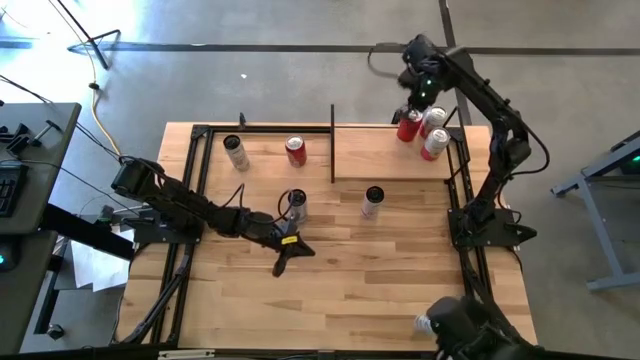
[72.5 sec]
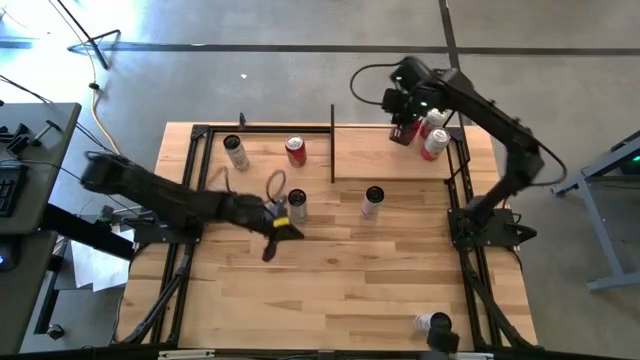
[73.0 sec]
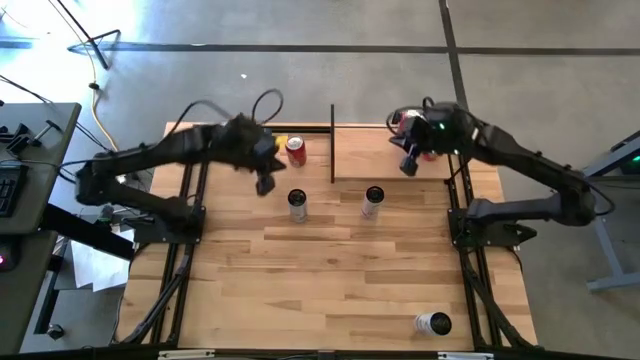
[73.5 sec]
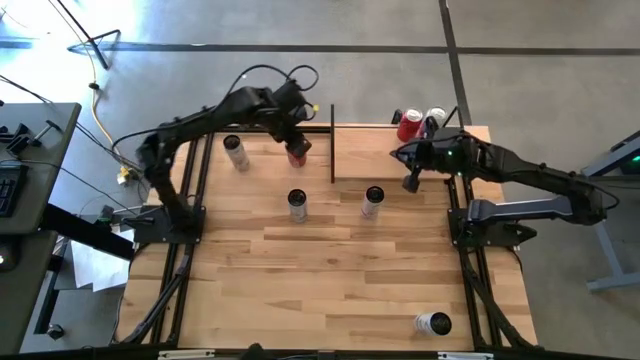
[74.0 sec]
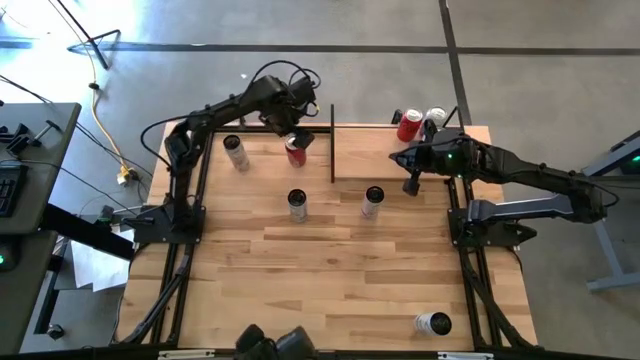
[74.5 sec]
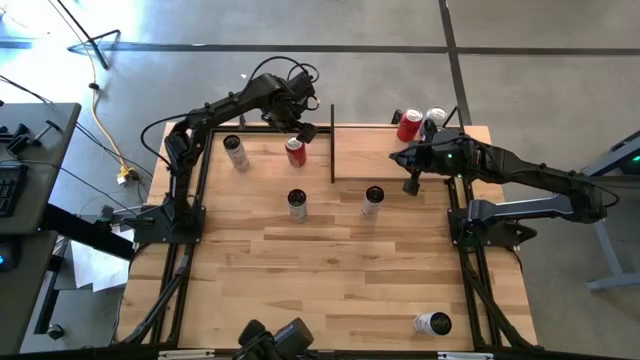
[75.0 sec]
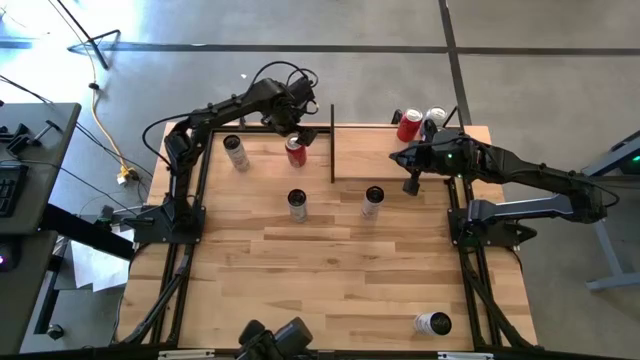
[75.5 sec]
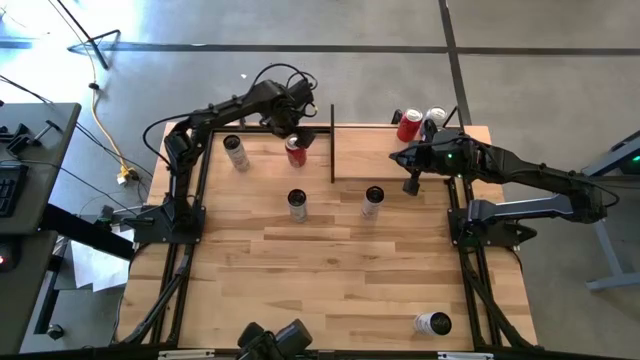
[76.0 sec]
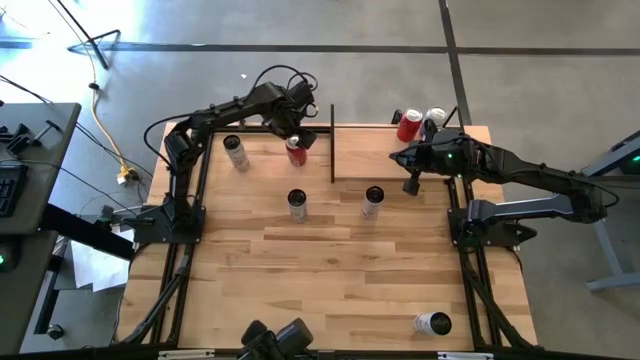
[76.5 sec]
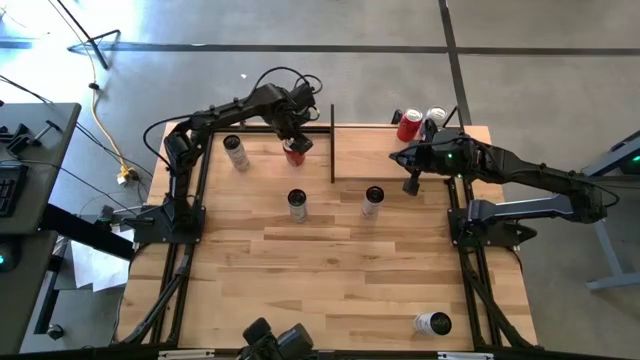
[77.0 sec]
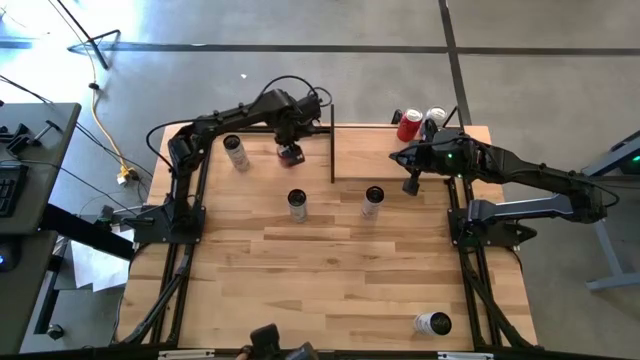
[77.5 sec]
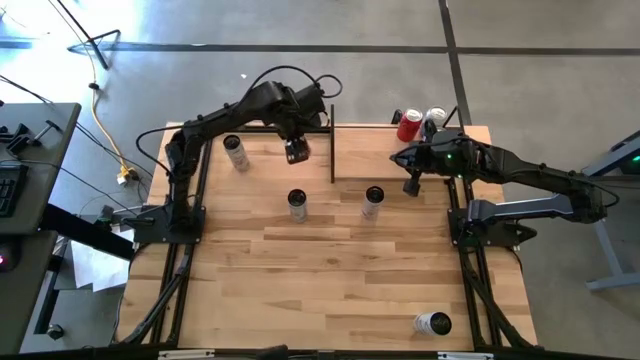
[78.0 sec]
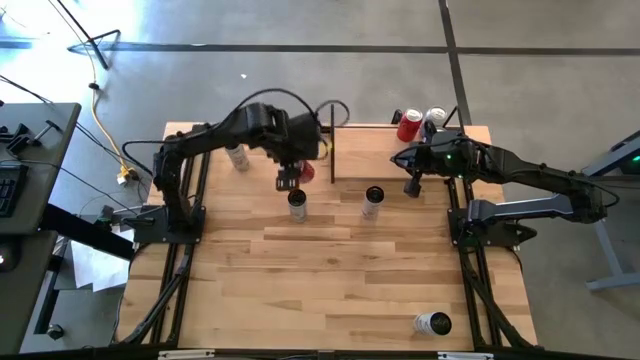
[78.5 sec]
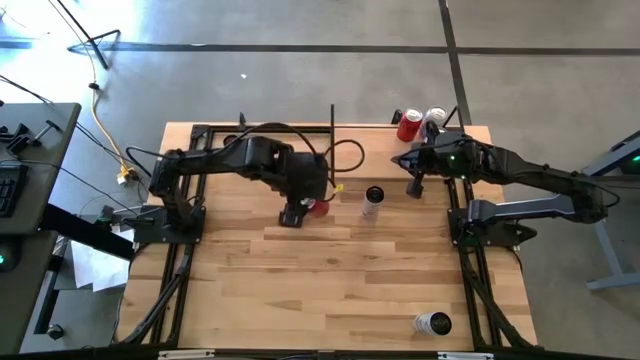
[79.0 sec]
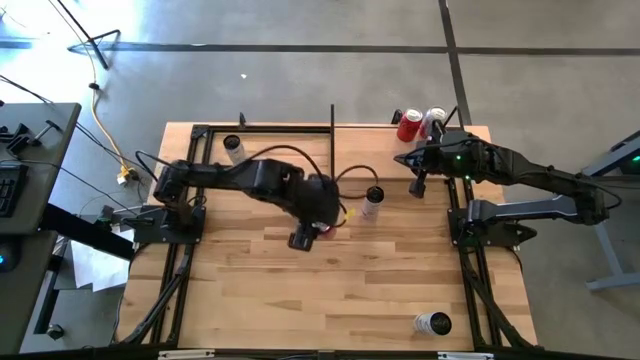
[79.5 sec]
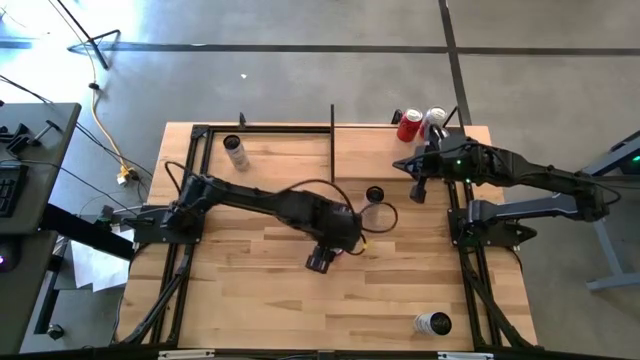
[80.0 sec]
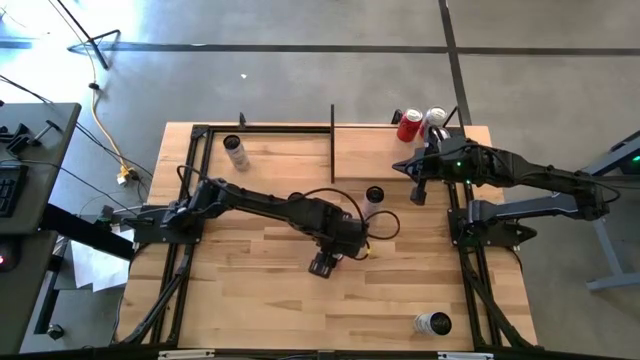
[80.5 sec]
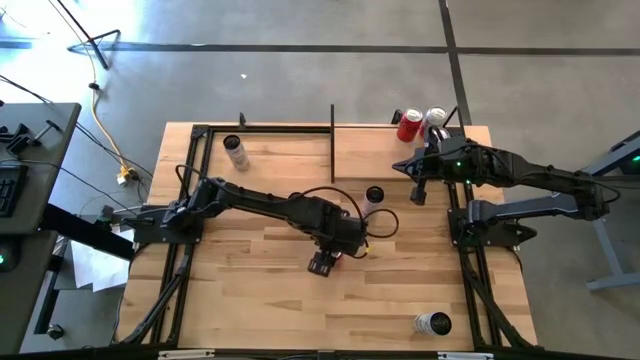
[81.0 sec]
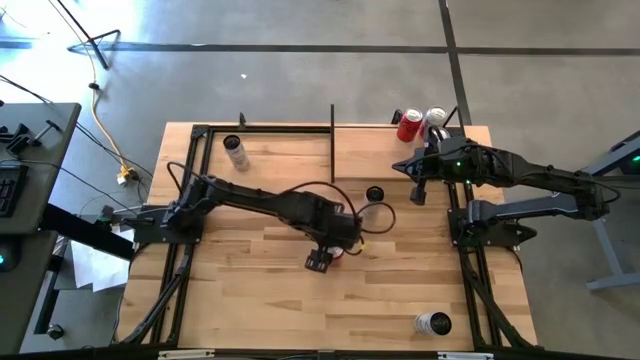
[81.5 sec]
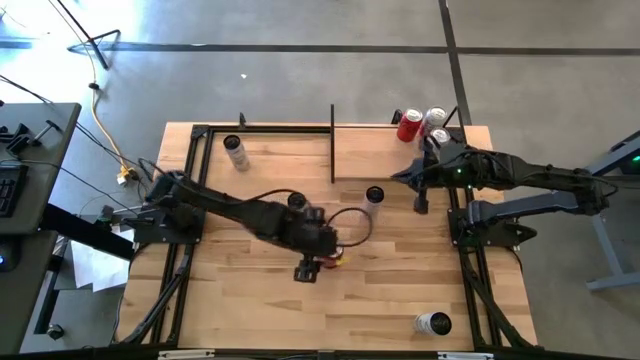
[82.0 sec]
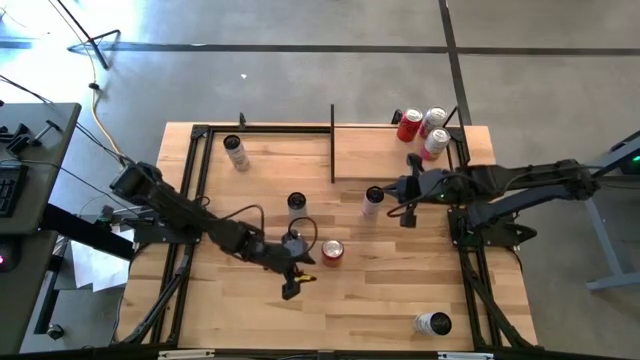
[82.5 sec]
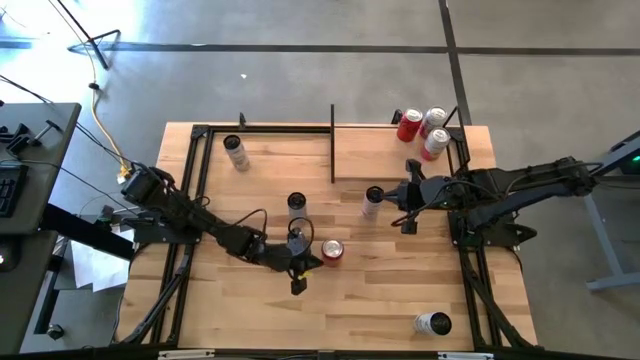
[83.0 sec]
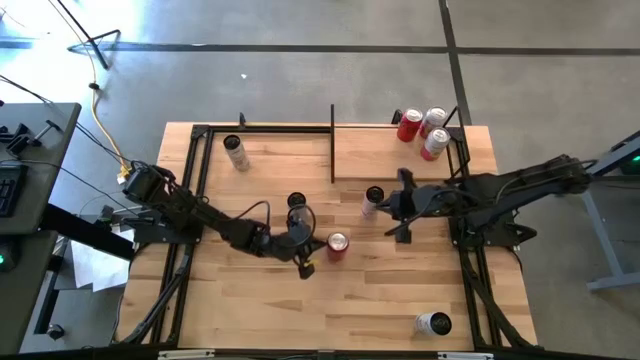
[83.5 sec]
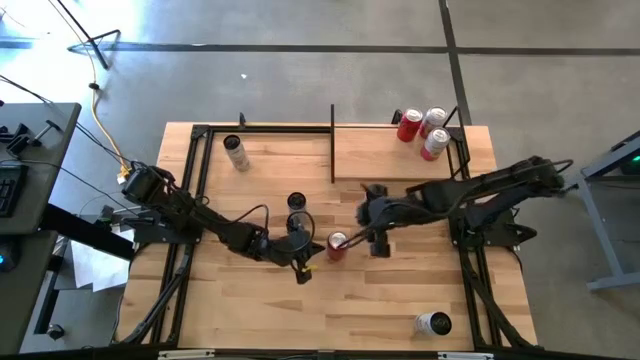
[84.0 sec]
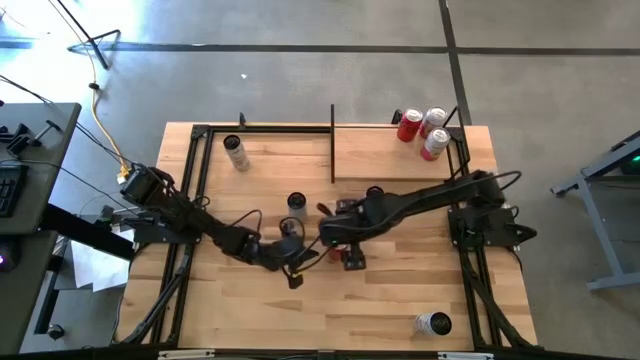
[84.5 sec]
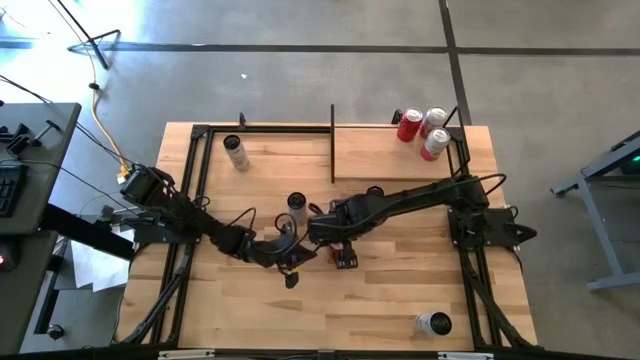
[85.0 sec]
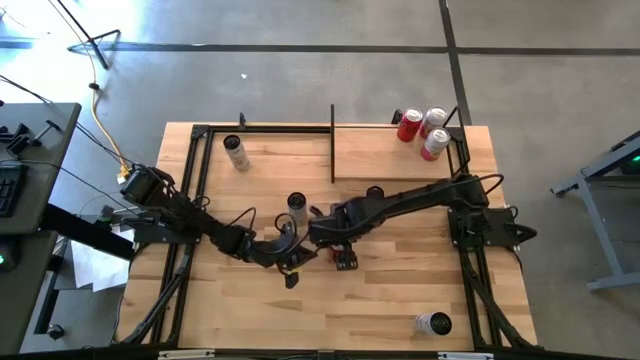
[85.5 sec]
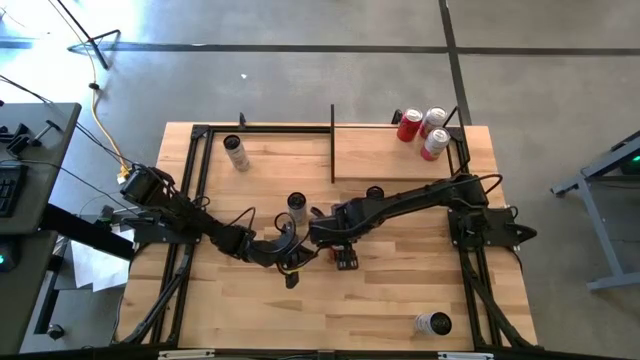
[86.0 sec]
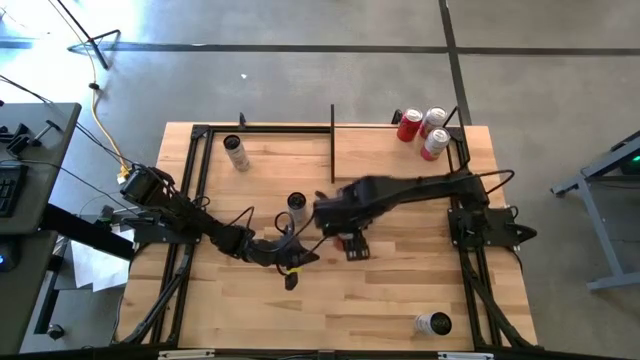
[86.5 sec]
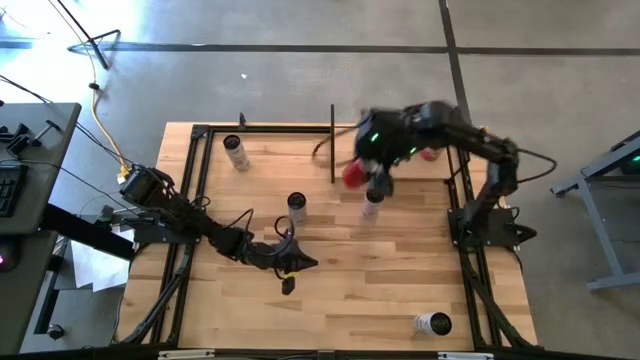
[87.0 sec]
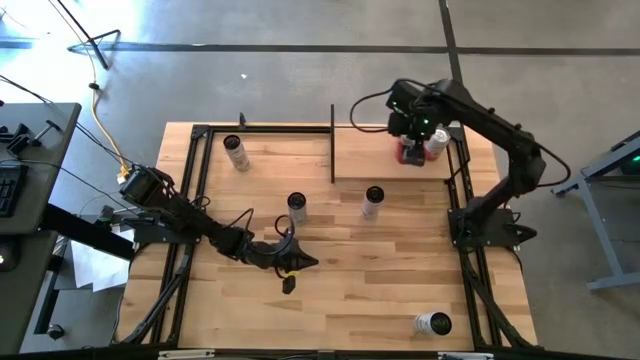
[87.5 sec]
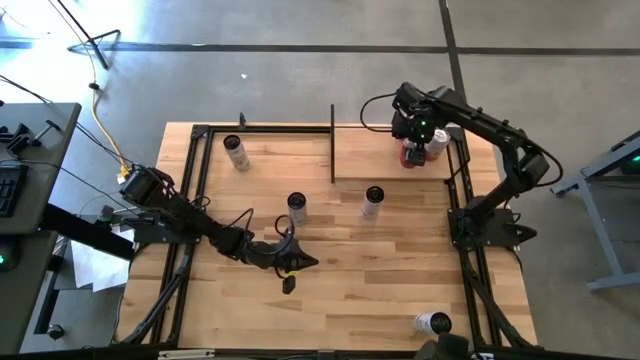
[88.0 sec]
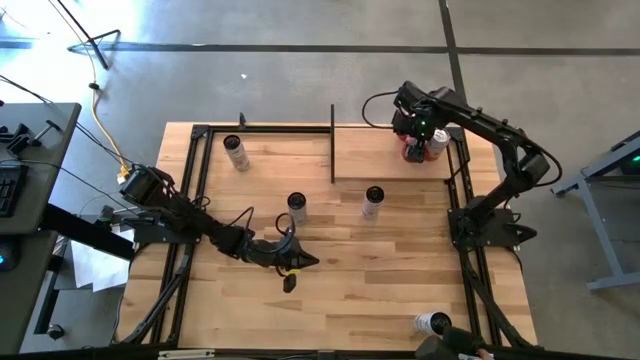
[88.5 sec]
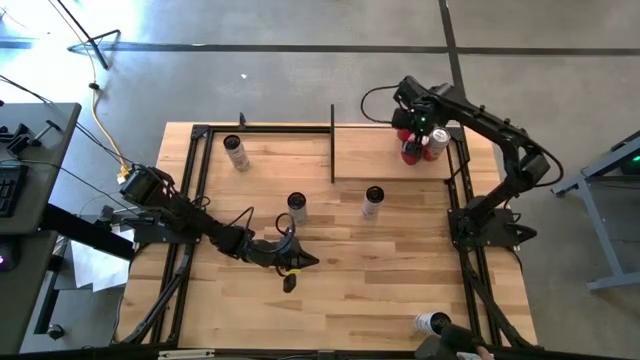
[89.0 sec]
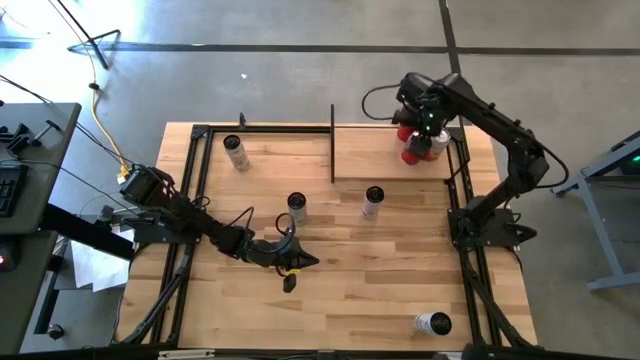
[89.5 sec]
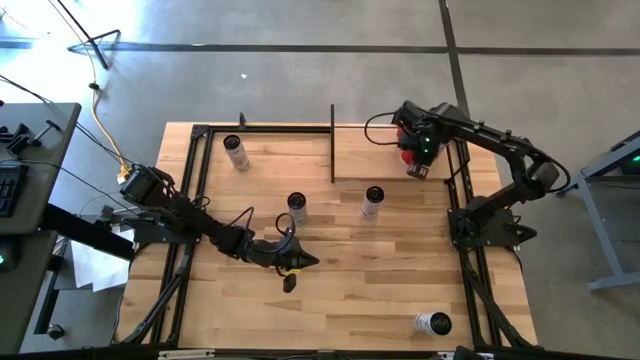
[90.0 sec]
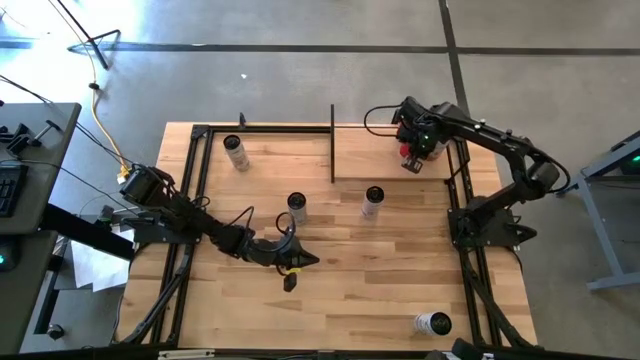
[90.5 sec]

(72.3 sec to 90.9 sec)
Task: Place canned beverage on shelf
Put the red soda can on the shelf aligned with the other red soda can

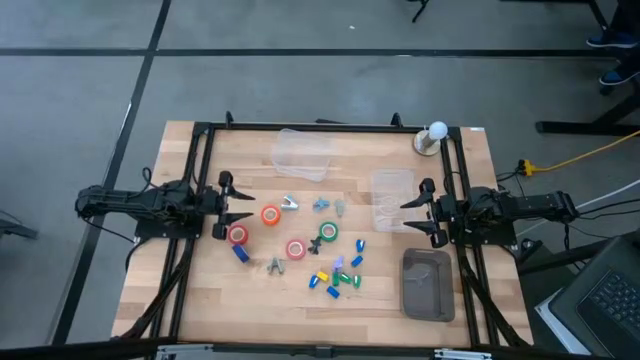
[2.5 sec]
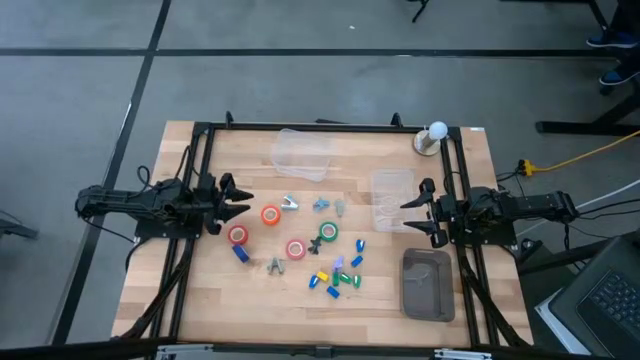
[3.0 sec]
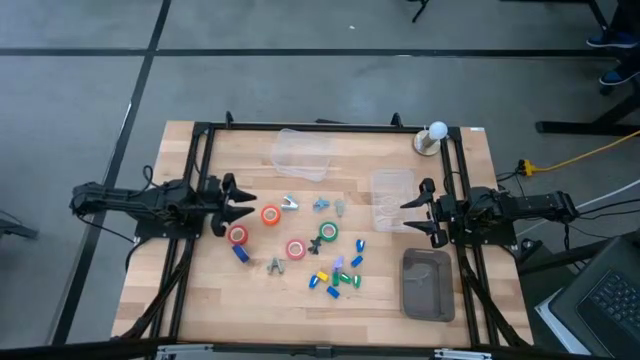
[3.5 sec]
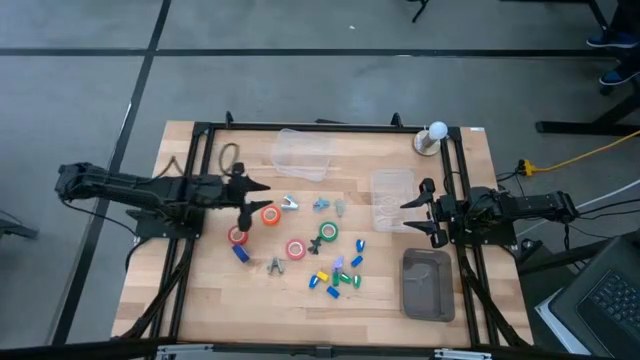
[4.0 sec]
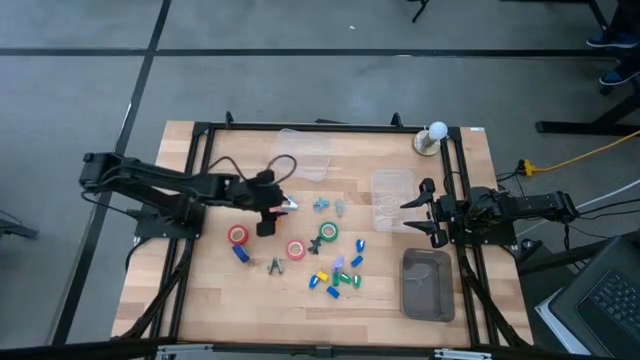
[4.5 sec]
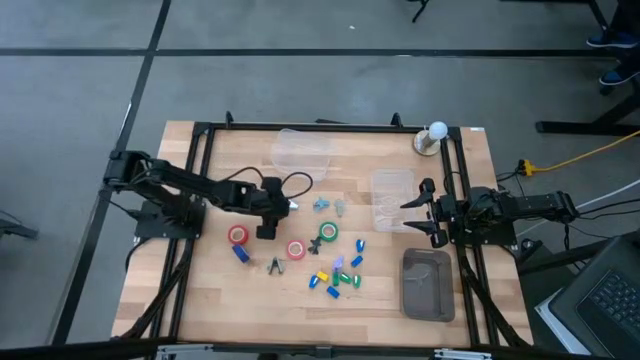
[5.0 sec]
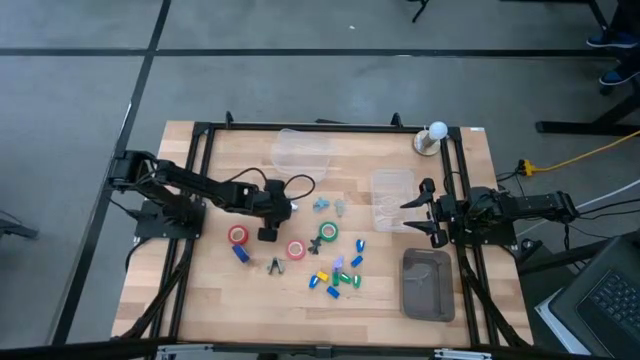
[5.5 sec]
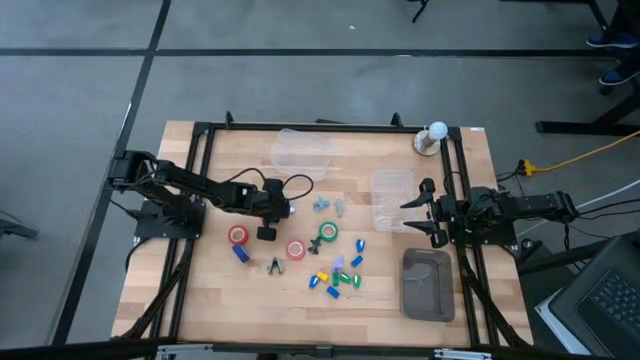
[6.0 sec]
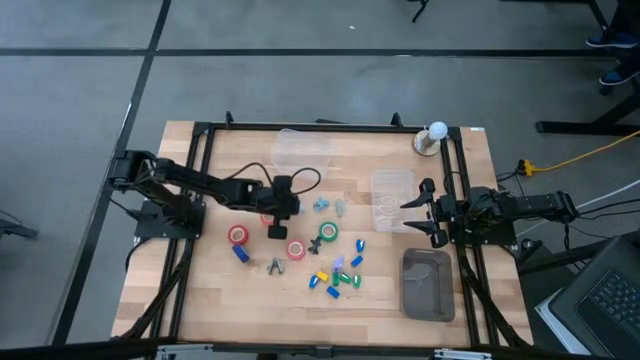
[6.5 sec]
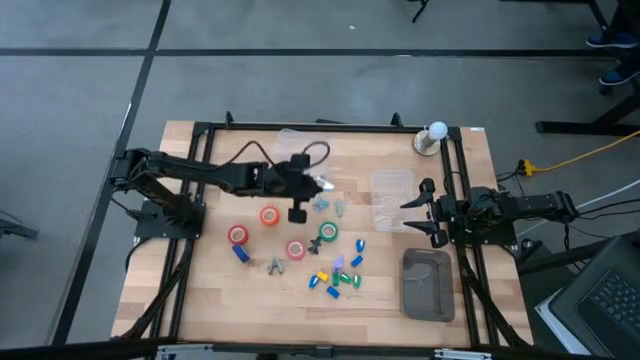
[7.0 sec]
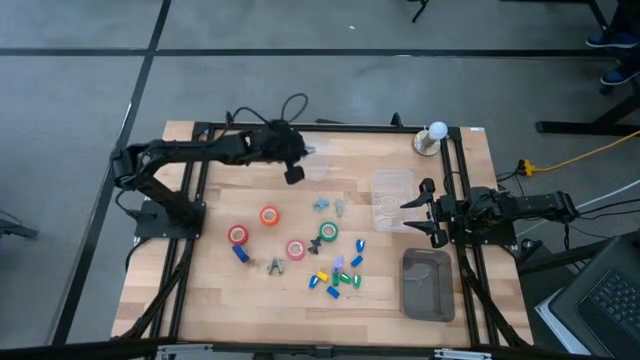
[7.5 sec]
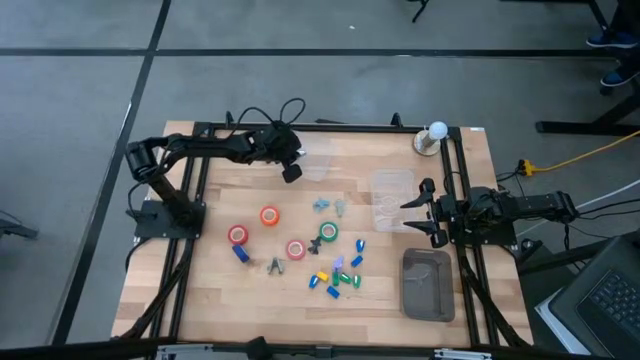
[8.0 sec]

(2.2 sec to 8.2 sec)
Task: Pick and place Stapler, Stapler remover, tape
Put the light blue staple remover into the top transparent bin
